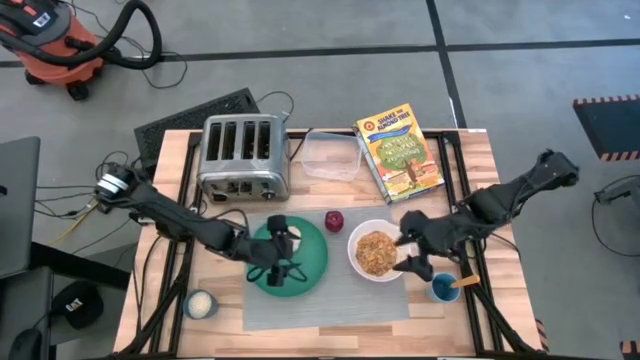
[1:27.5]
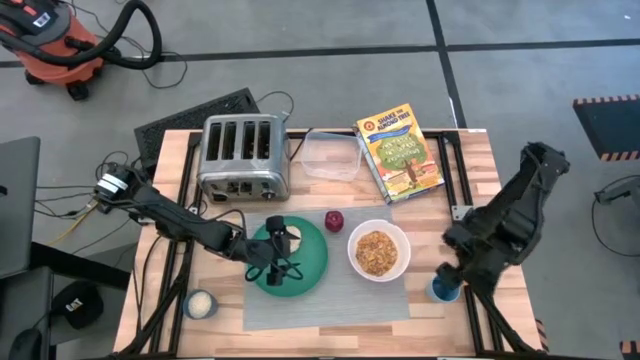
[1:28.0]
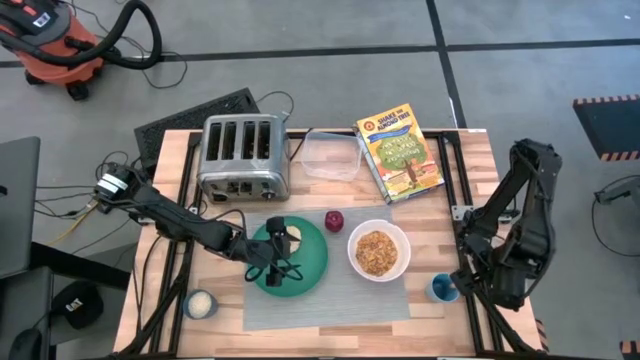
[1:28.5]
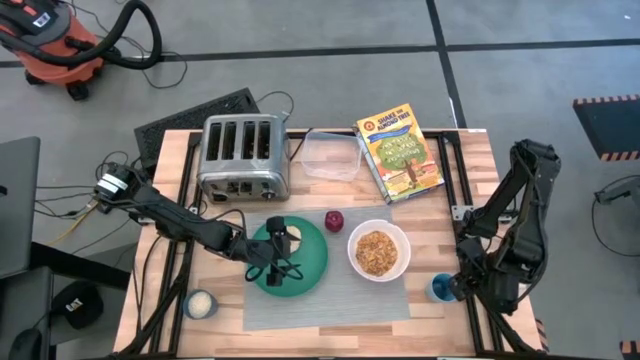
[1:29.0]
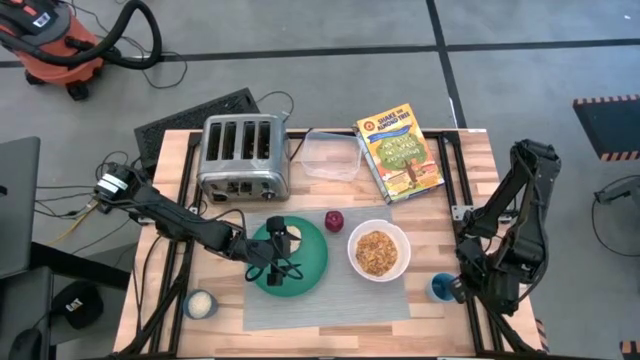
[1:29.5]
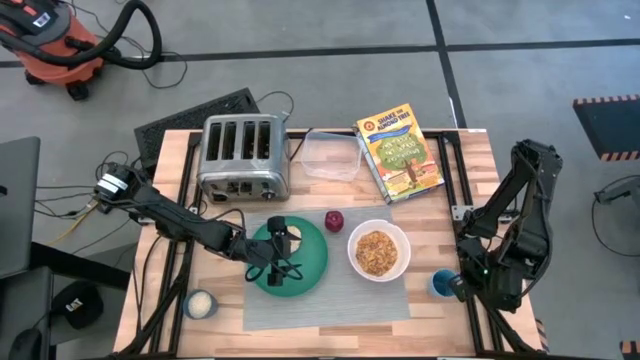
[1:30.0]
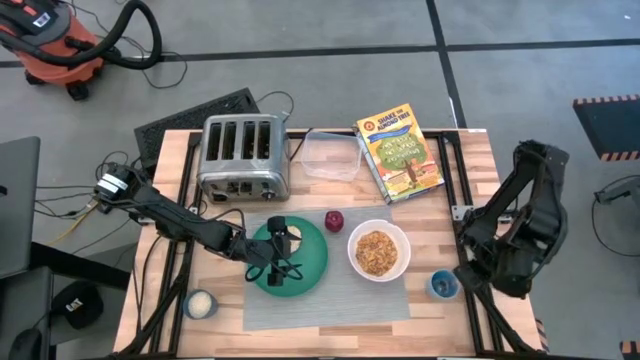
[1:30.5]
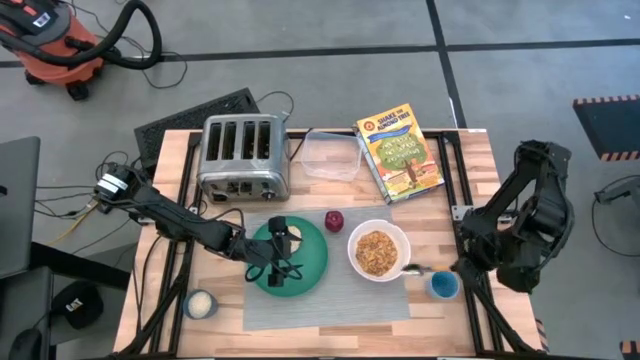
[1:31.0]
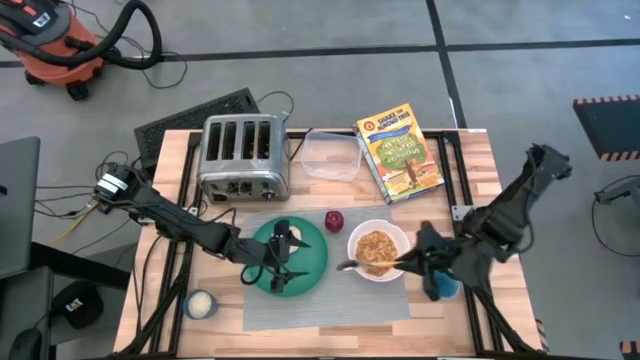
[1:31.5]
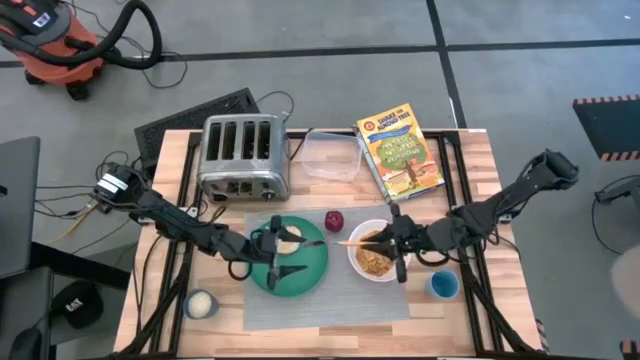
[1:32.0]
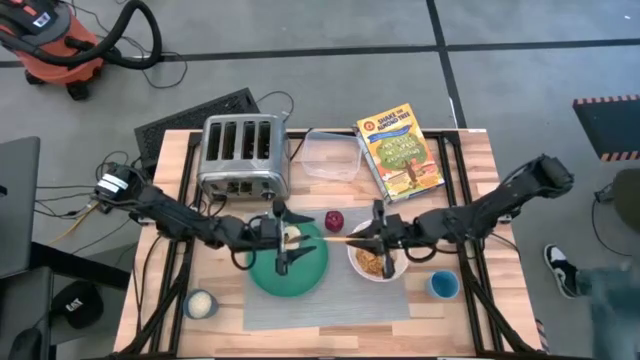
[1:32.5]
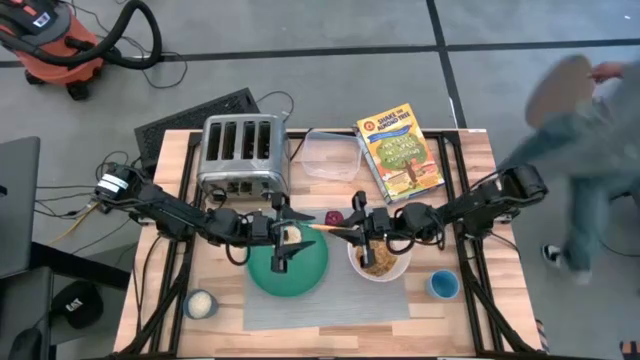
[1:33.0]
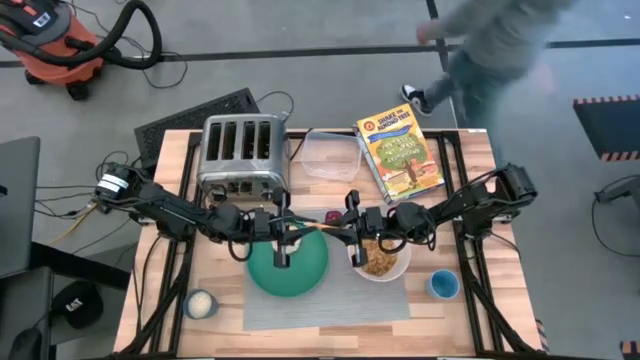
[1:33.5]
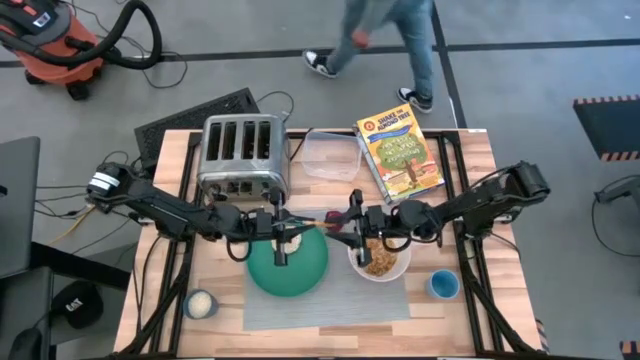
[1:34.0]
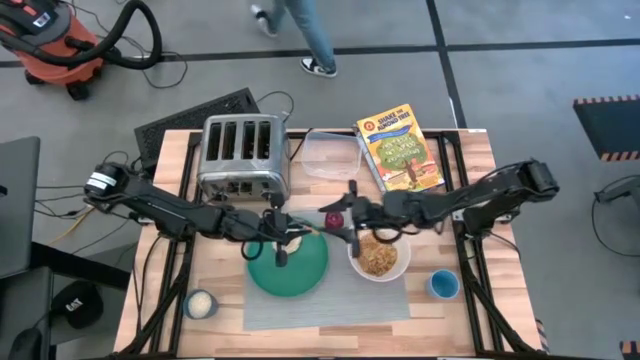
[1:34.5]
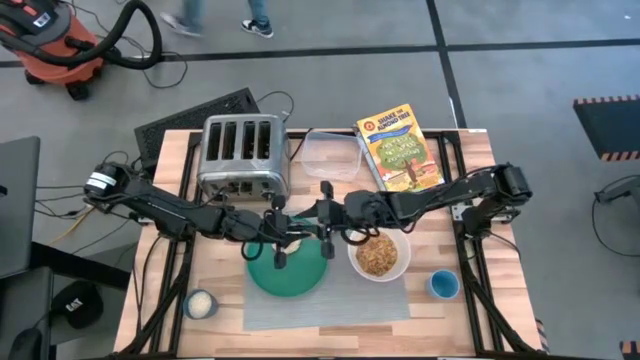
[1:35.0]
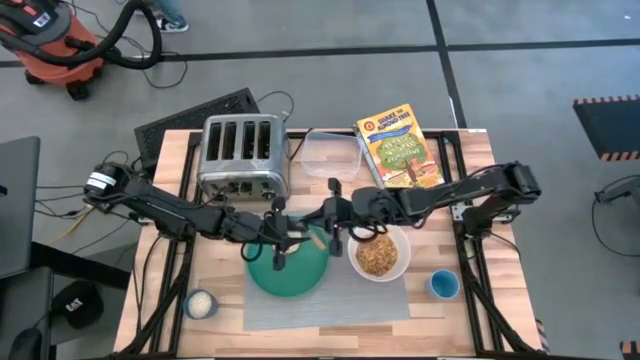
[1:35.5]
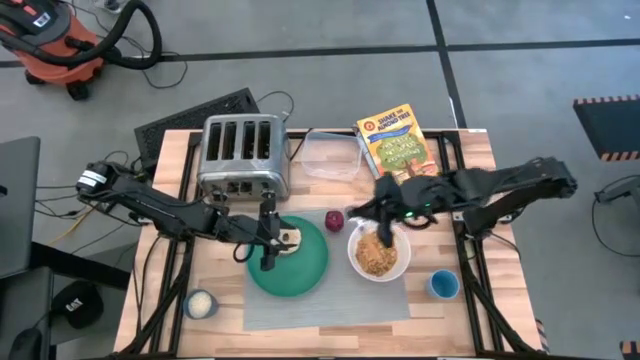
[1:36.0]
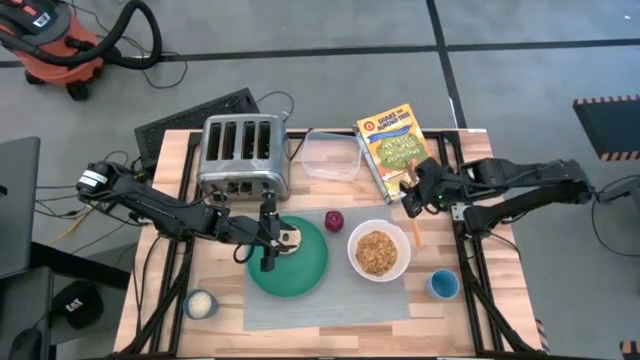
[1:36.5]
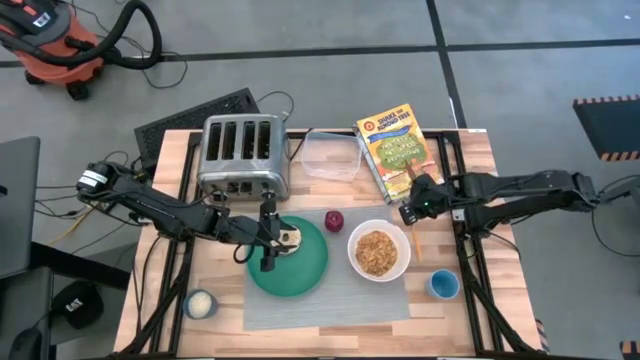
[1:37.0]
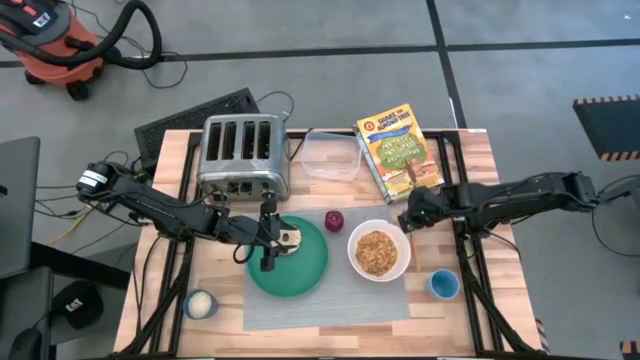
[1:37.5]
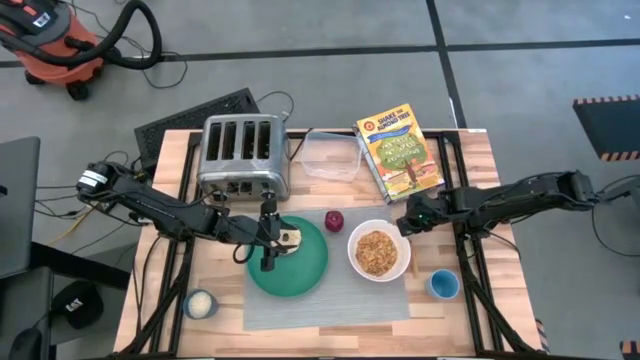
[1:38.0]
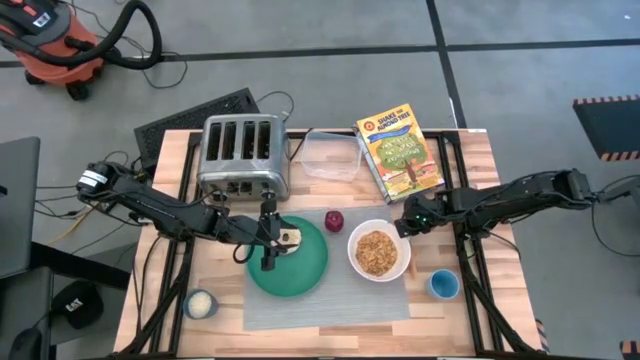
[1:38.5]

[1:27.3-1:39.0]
Task: Arrange a breakfast setting
Put the brown spoon on the right side of white bowl

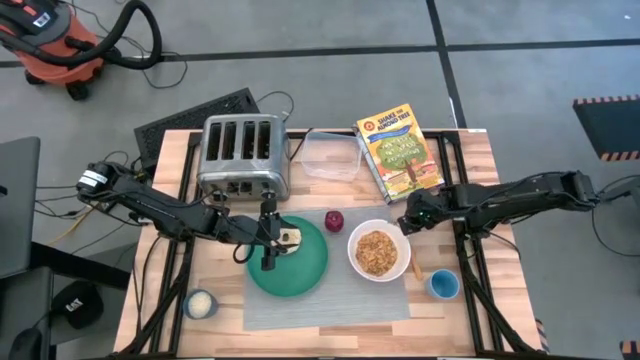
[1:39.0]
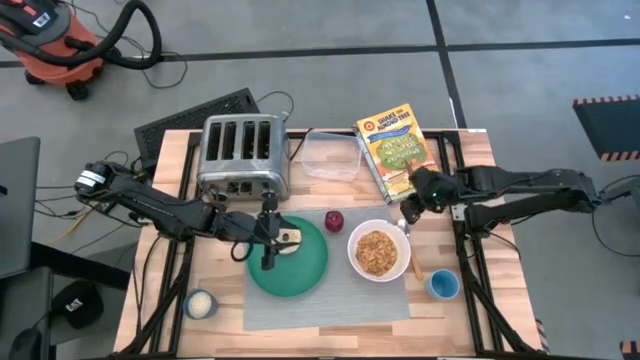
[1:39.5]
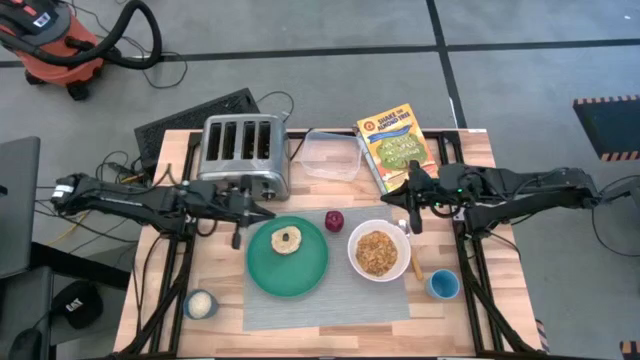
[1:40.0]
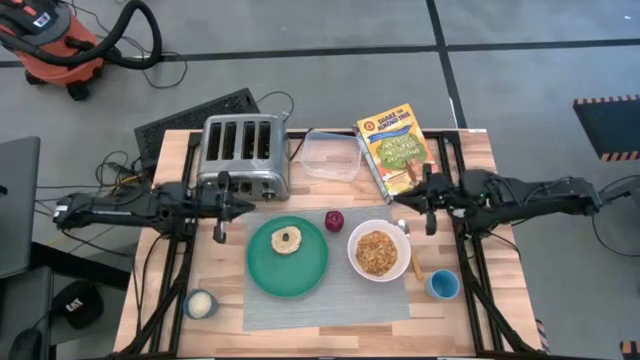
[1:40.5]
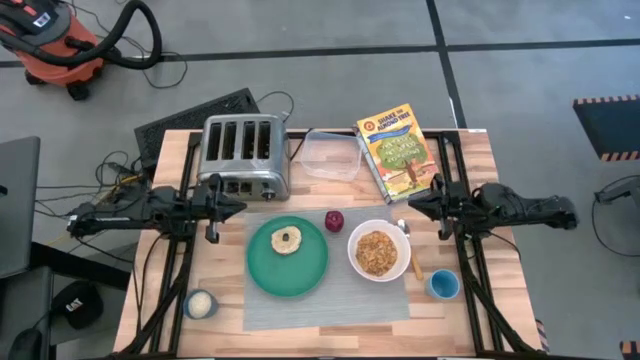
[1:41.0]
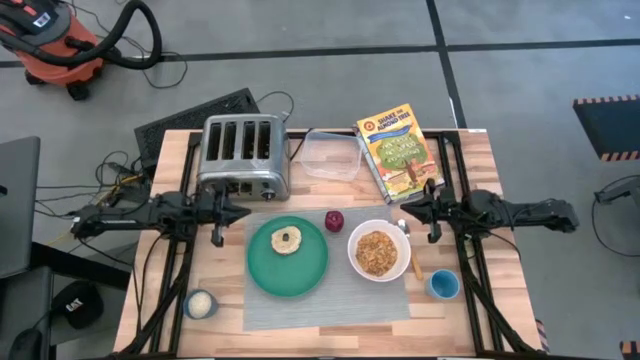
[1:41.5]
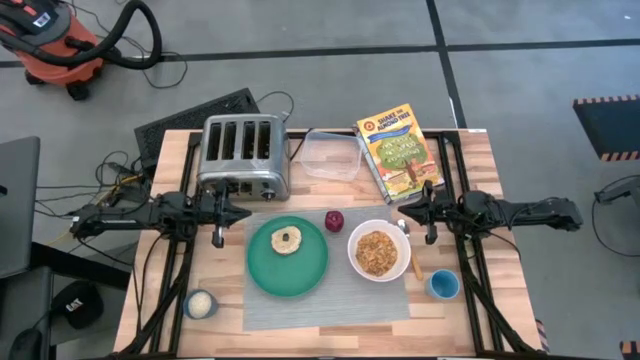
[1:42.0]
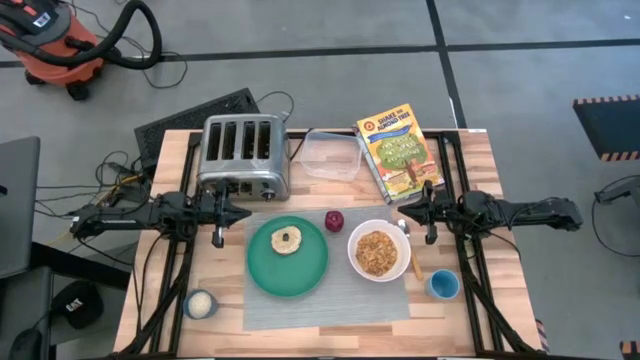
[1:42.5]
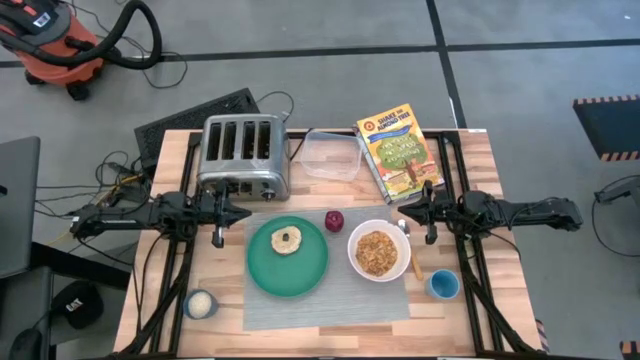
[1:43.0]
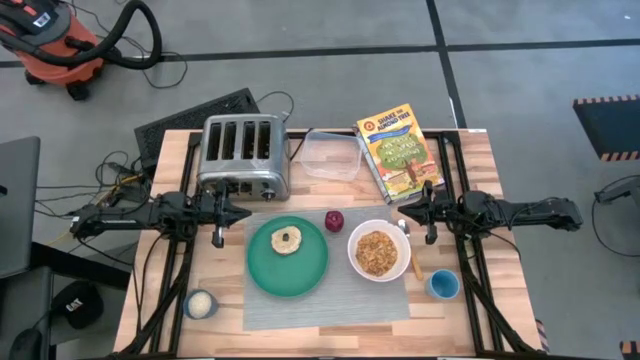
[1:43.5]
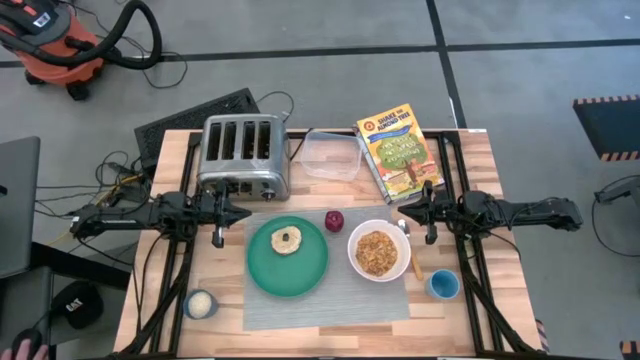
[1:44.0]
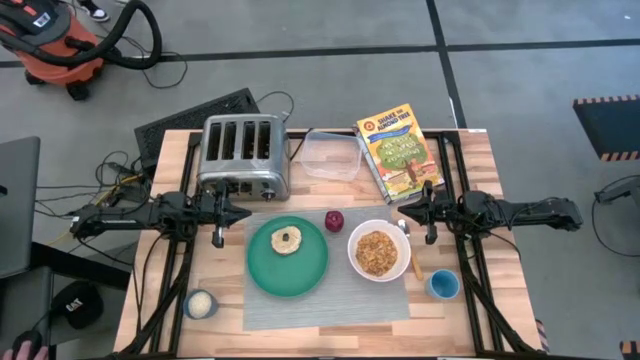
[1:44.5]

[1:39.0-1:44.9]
Return to Home Position

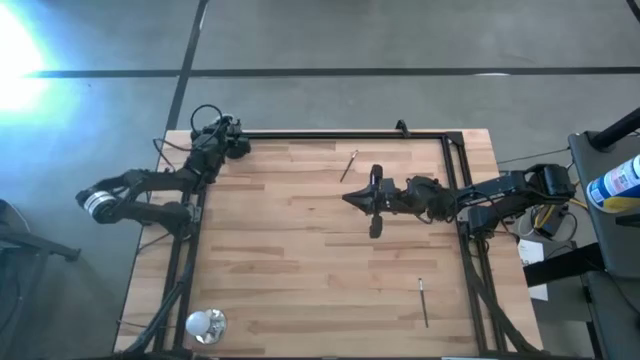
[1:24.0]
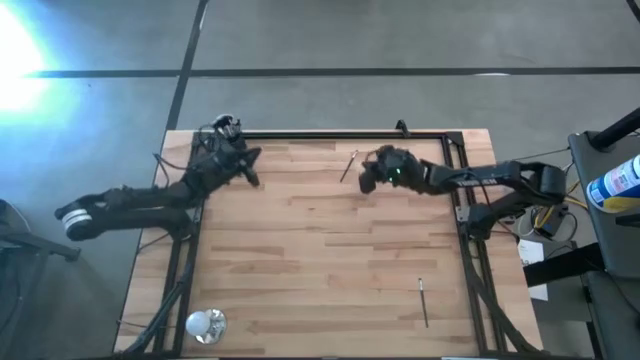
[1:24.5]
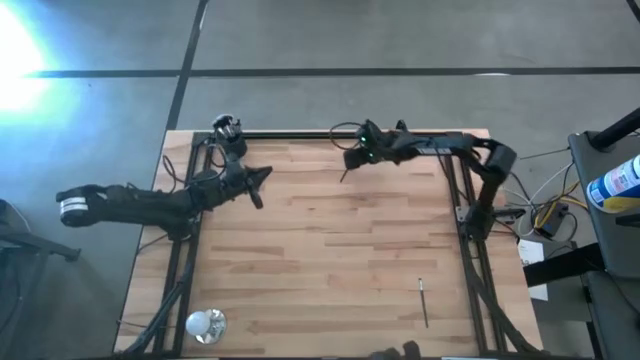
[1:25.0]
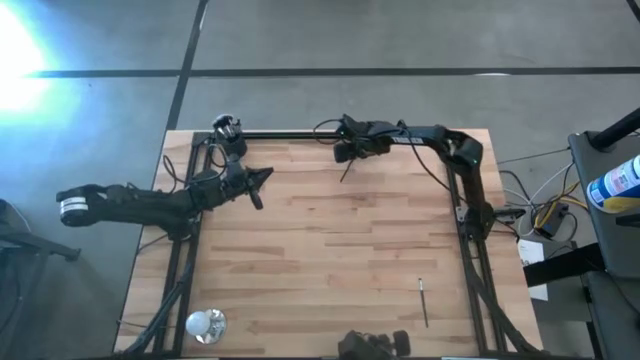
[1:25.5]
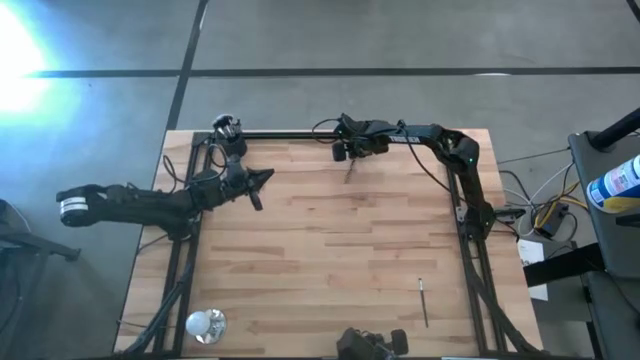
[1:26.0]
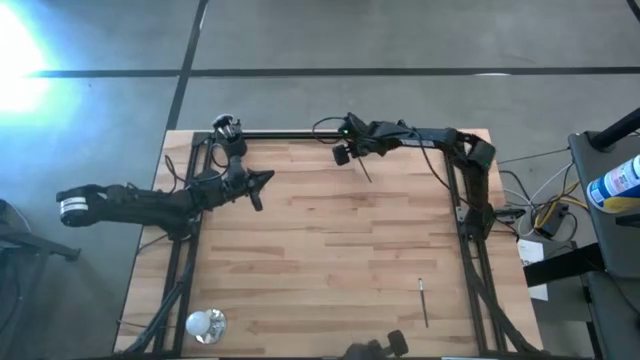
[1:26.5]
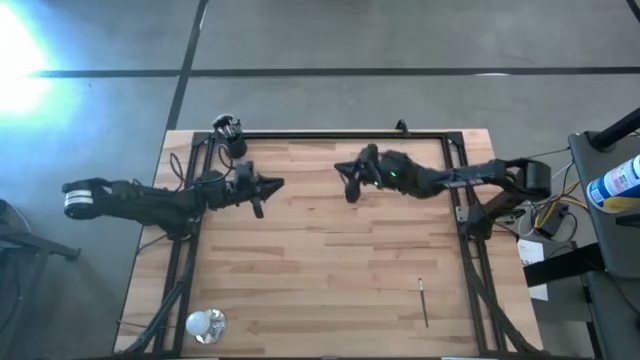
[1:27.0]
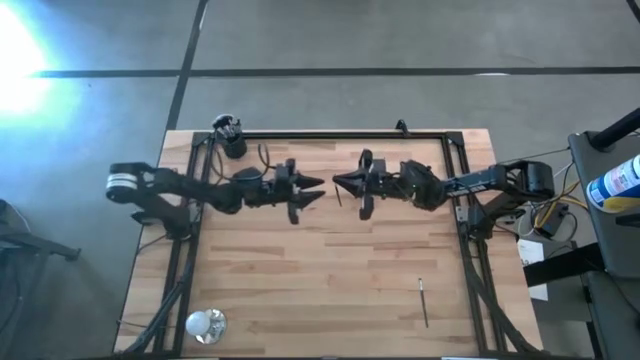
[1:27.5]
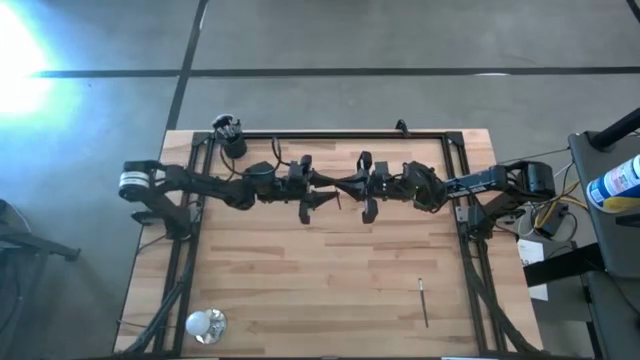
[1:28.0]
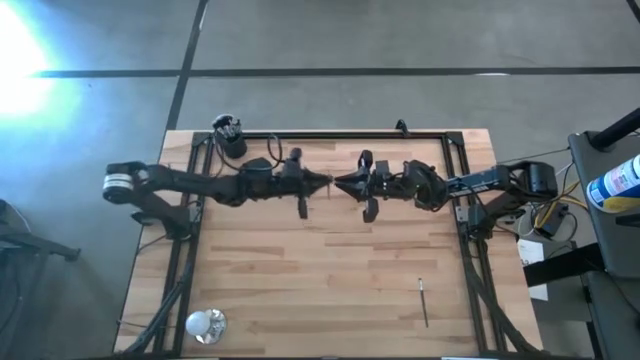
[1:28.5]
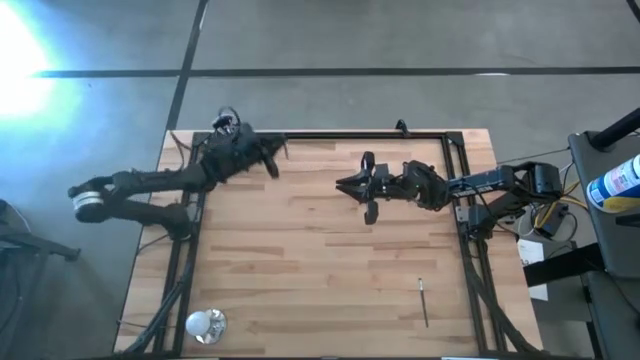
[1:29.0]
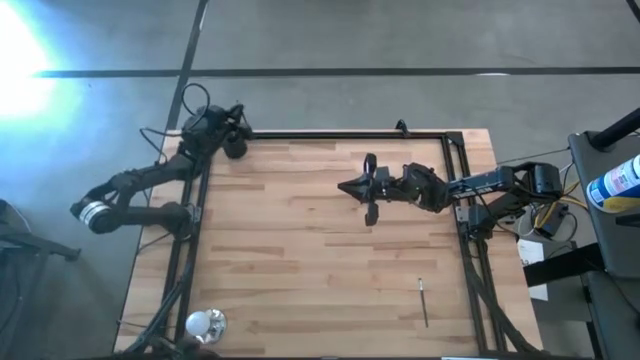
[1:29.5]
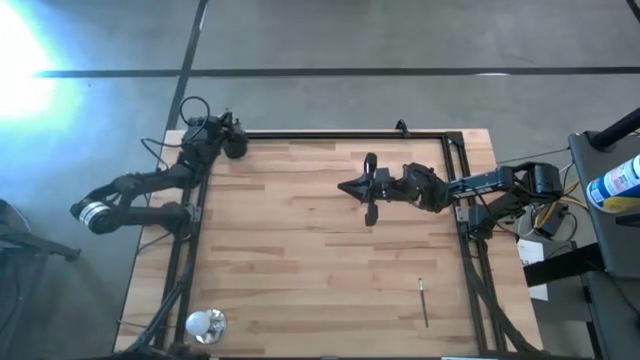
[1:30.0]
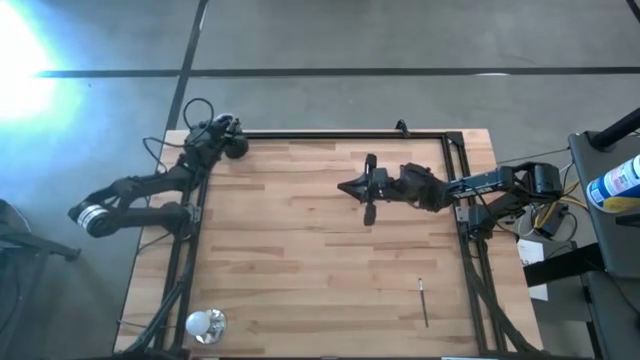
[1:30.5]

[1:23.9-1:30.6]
Task: Put items in baskets/containers
Put the black eyeshadow brush into the black pen holder
